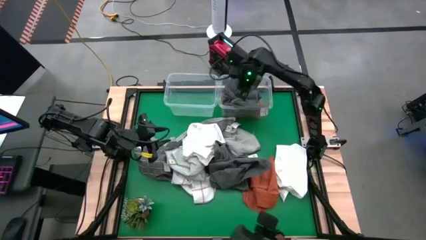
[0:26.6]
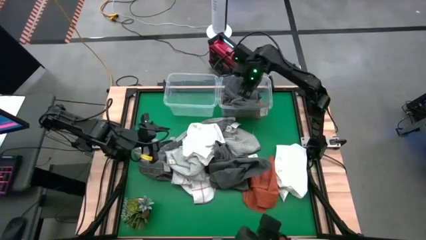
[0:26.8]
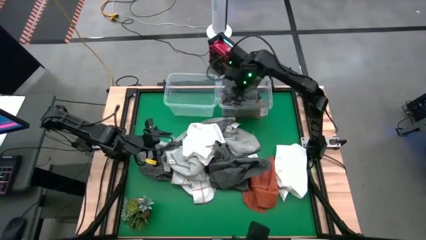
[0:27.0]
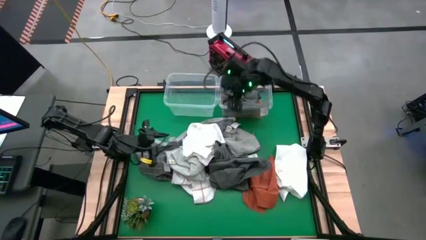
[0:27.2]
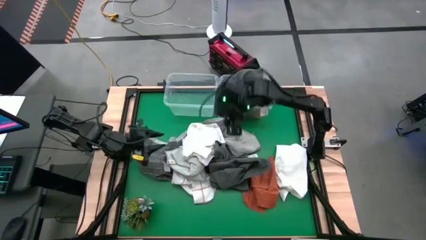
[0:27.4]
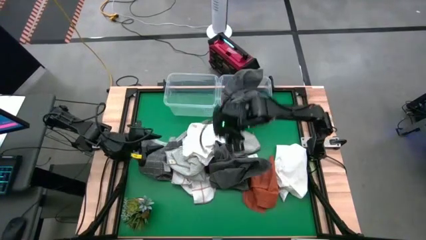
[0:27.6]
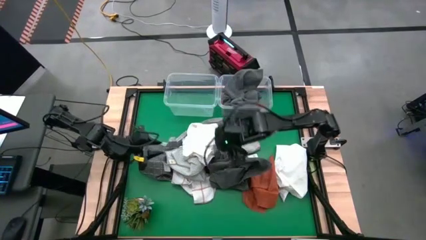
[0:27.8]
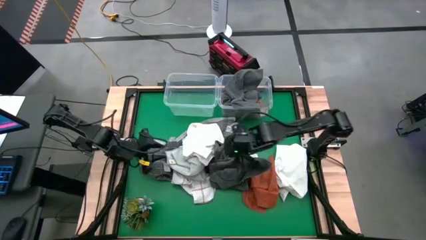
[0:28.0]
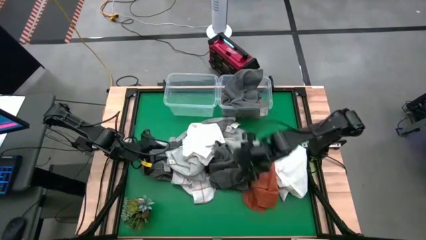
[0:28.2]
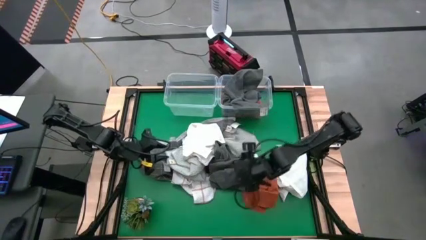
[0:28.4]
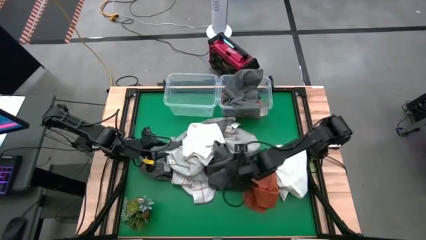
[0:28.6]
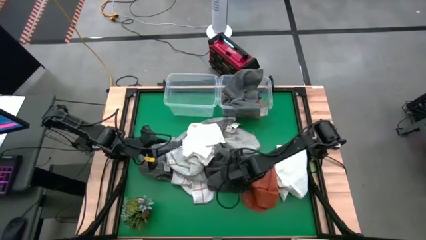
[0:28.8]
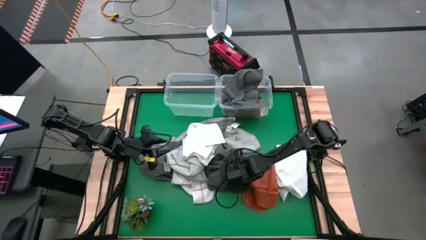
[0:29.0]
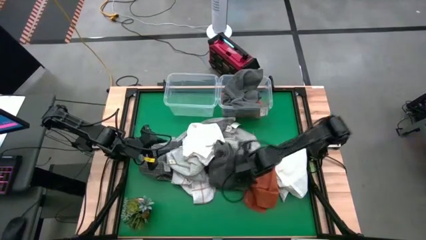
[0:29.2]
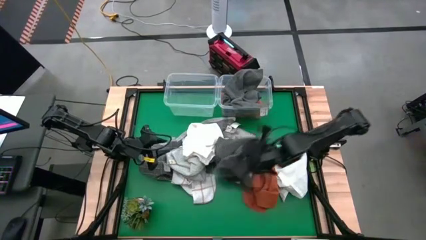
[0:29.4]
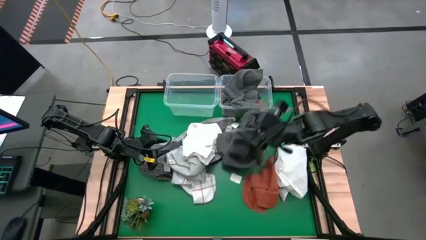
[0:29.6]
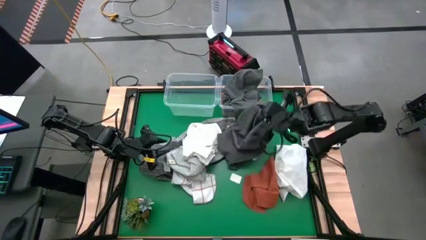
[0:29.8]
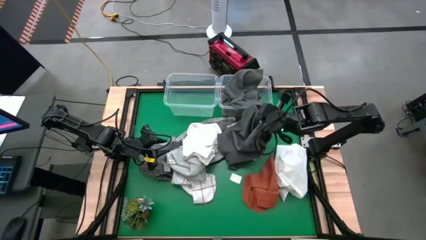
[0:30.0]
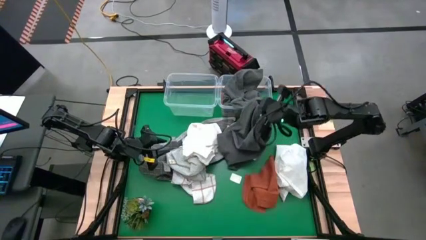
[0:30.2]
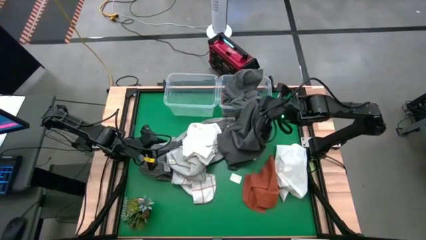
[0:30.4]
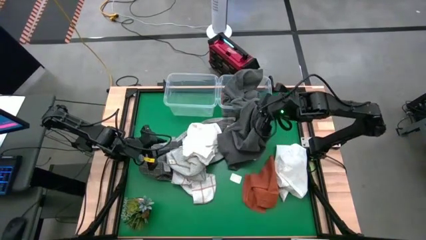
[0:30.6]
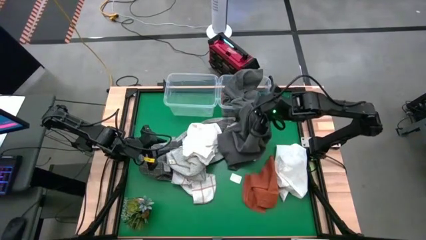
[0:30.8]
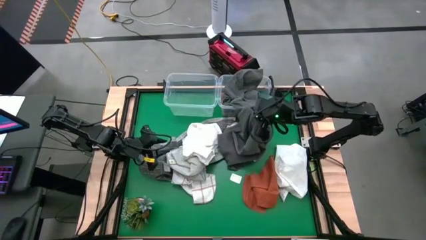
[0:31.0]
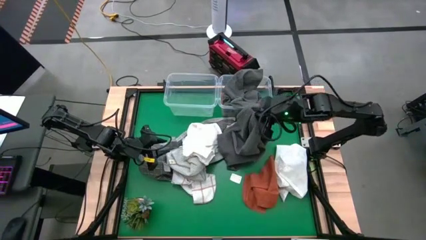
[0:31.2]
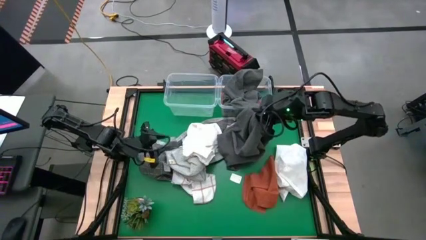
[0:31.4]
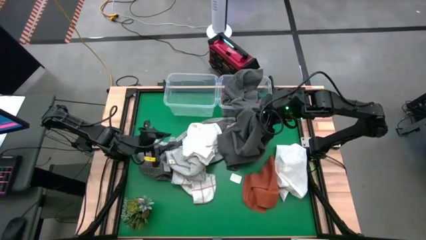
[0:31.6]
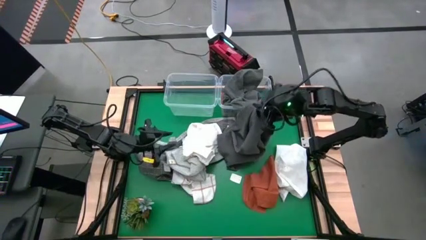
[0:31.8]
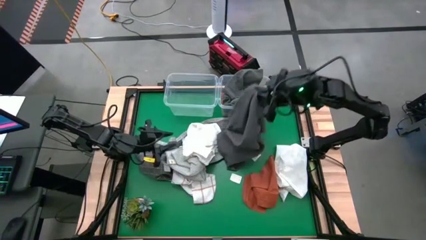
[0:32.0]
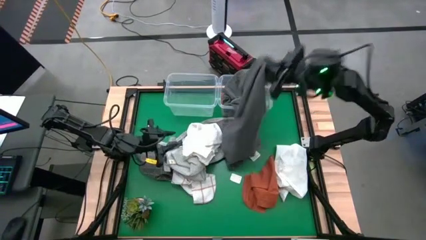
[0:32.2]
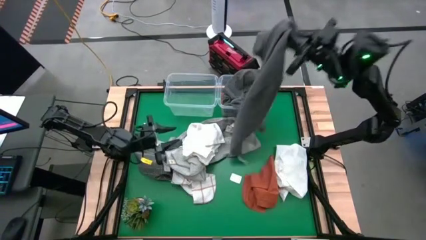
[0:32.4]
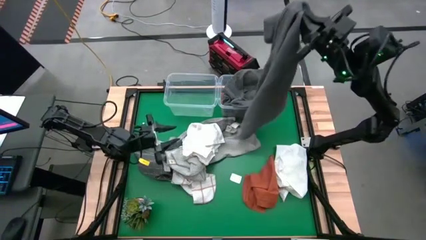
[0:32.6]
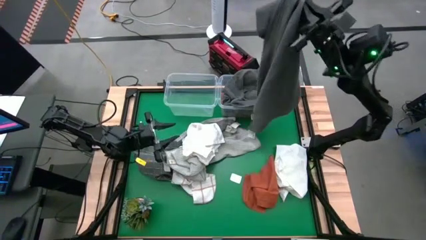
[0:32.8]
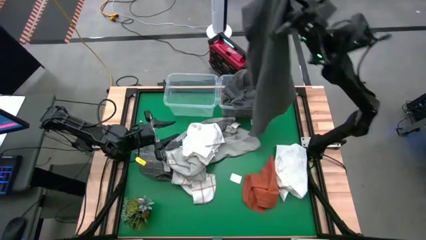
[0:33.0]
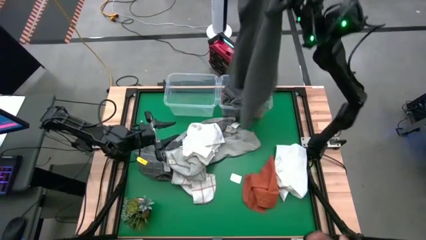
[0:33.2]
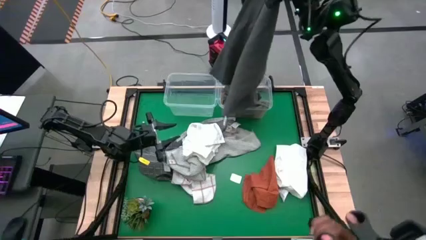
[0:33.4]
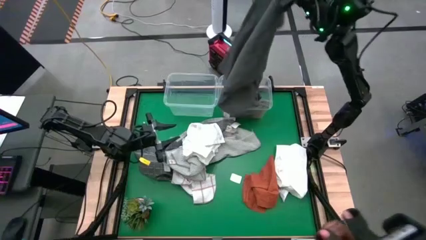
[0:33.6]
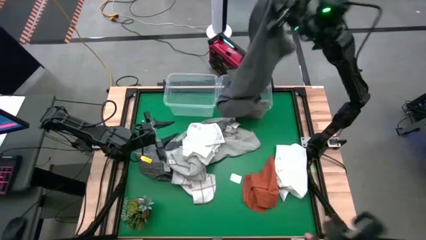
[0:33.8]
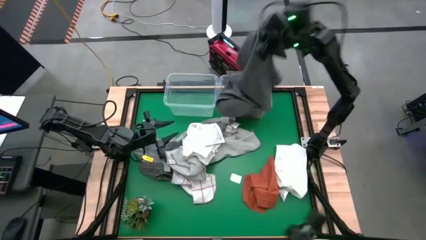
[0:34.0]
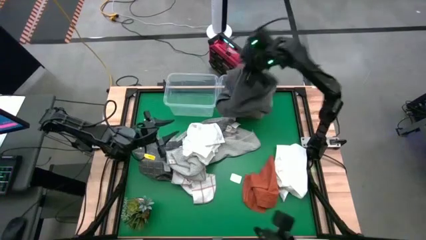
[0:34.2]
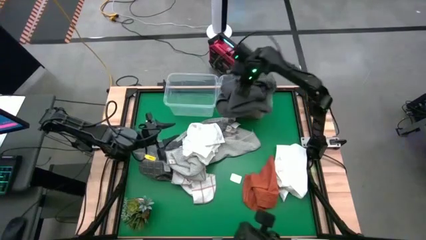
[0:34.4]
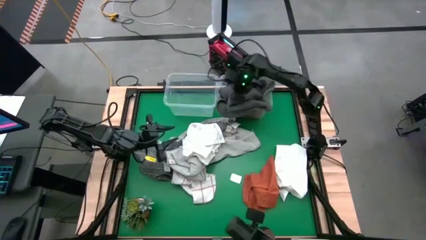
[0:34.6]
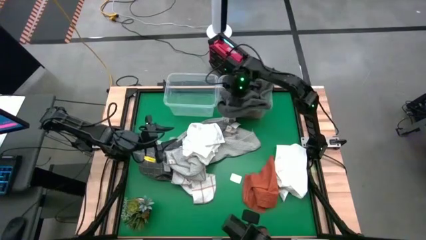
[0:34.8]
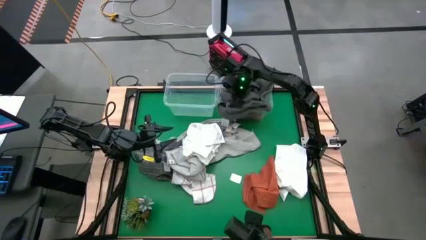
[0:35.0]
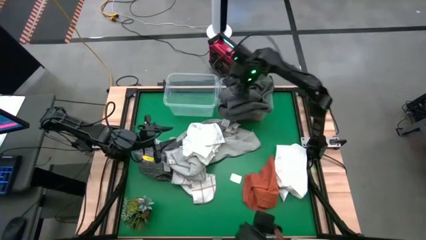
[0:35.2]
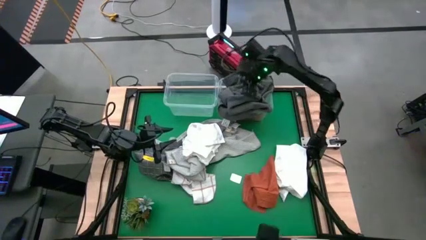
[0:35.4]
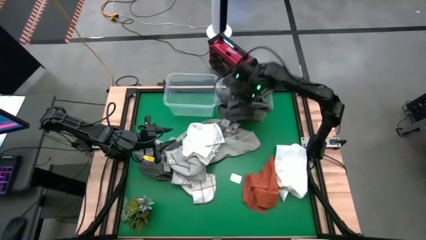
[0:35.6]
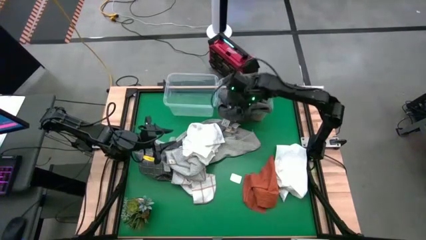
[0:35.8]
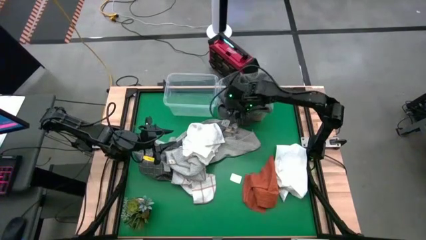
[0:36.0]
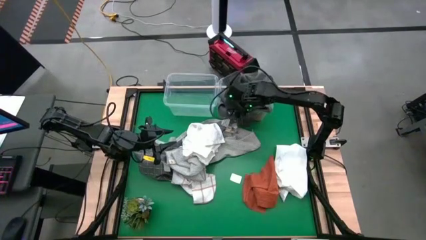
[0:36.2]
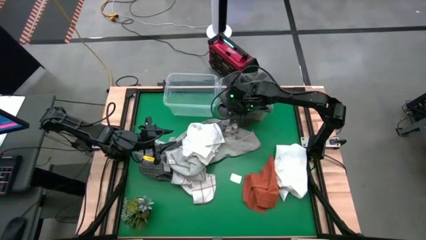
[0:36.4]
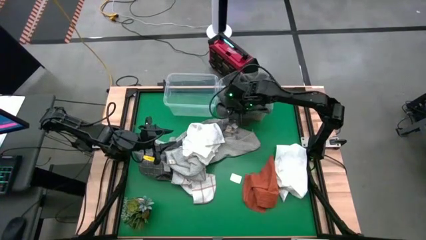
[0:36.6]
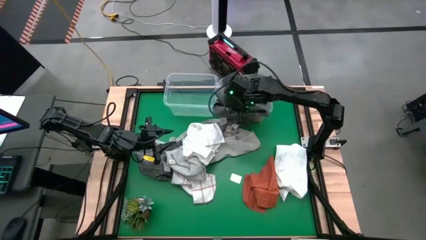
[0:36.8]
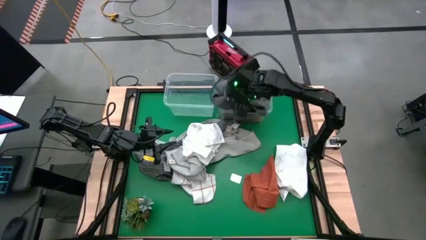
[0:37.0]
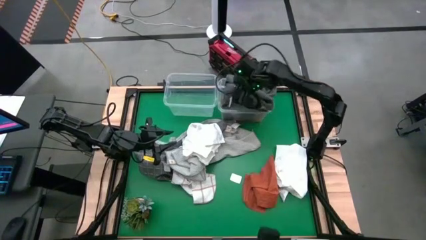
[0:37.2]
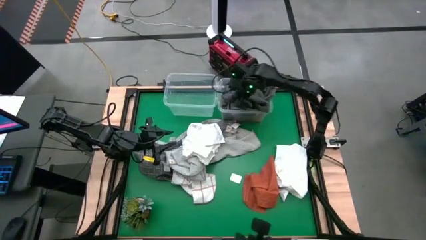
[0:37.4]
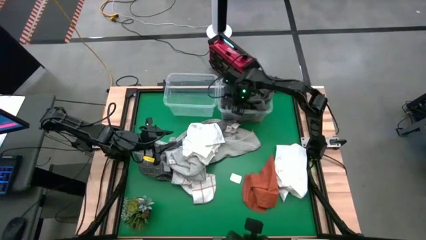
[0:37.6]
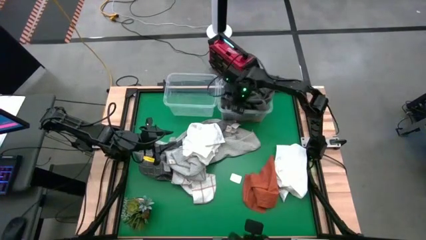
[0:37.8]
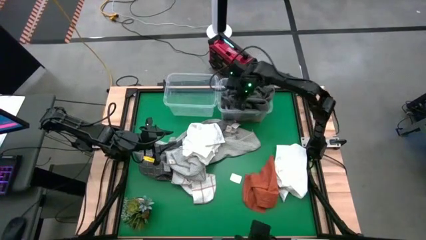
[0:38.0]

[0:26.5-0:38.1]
Task: Sort towels by color in basket
Put the black towel into the right transparent bin

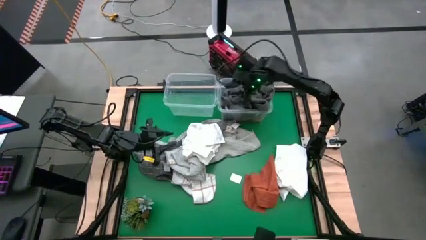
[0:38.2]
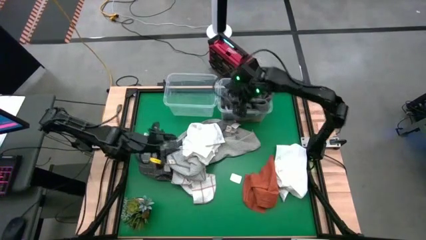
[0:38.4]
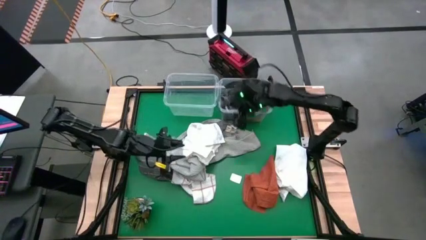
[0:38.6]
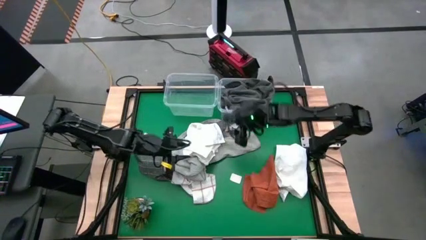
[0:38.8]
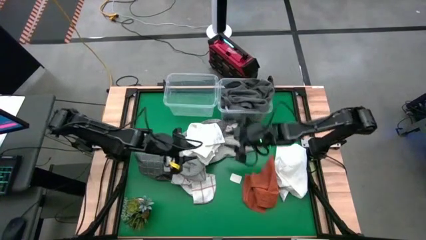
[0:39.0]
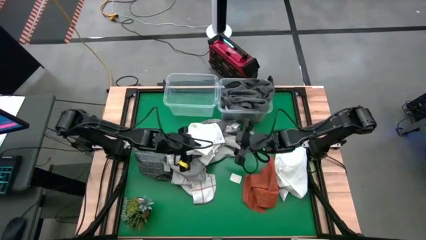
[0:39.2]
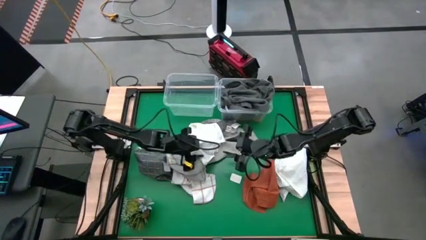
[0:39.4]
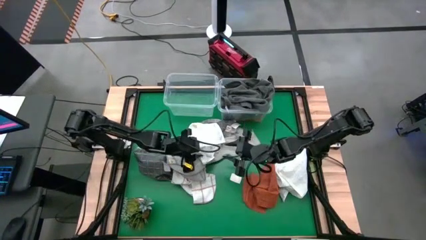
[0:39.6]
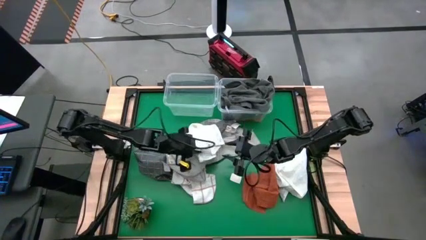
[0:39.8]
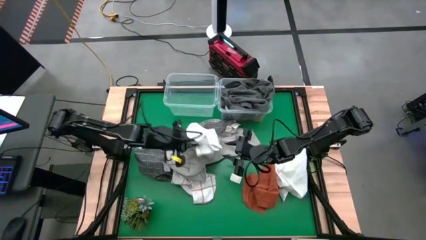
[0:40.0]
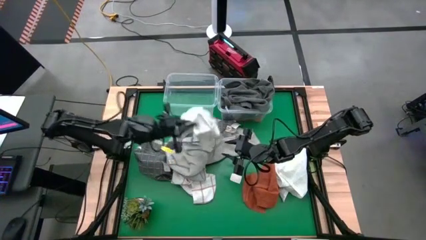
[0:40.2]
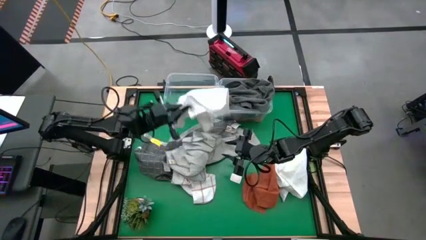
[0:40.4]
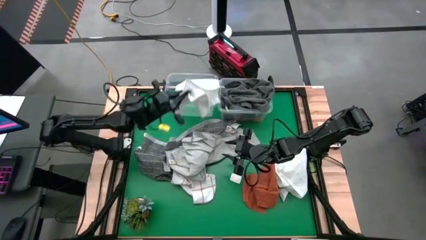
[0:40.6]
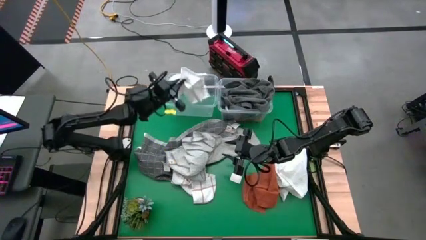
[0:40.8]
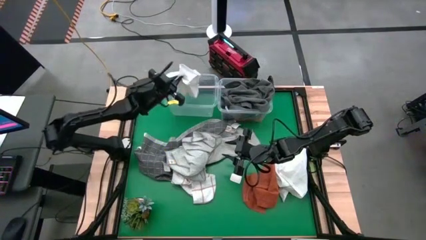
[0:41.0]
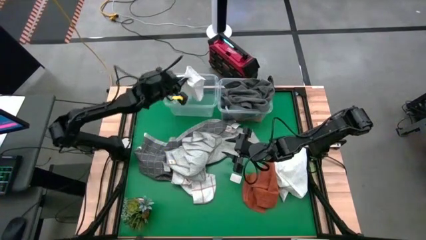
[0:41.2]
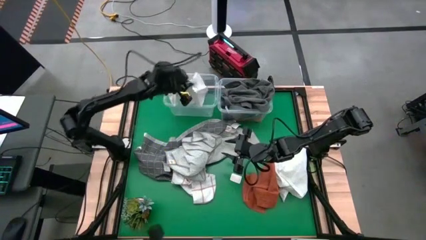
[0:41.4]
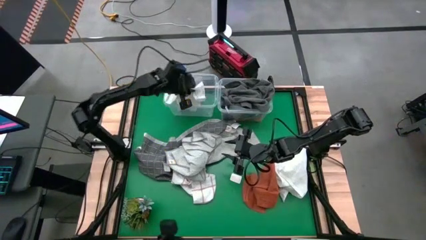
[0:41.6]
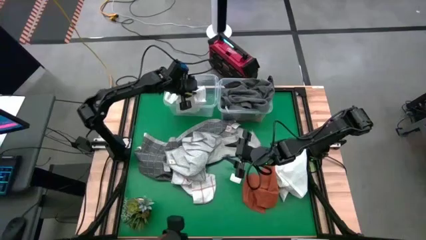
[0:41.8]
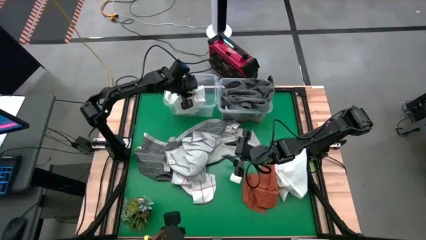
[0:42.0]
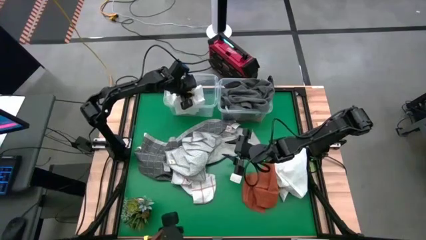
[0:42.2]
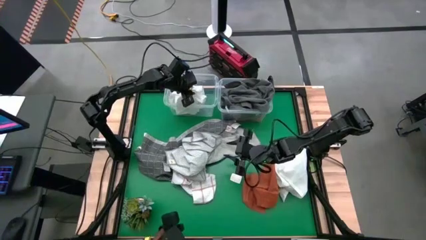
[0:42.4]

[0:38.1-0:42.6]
Put the white towel into the left transparent bin
